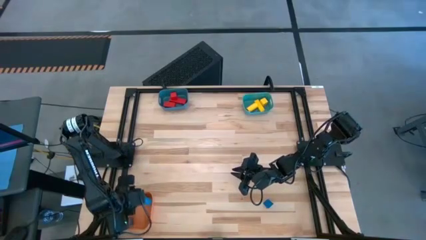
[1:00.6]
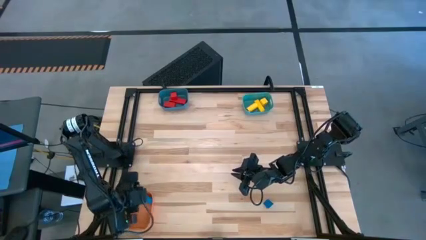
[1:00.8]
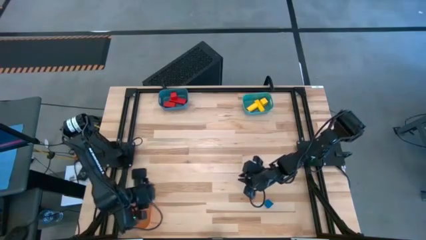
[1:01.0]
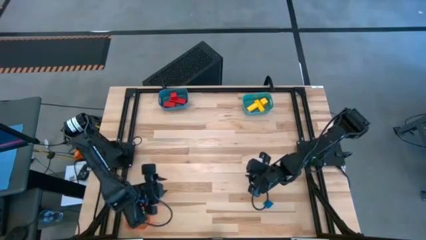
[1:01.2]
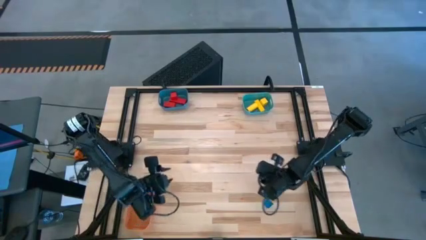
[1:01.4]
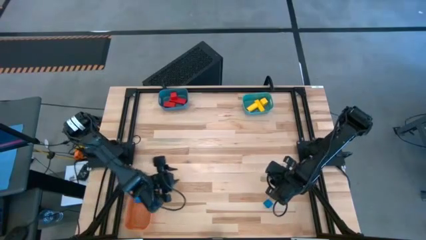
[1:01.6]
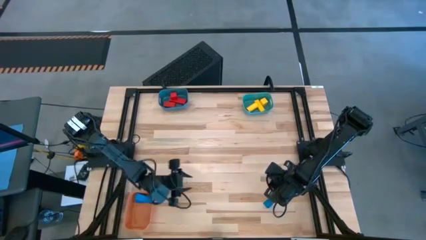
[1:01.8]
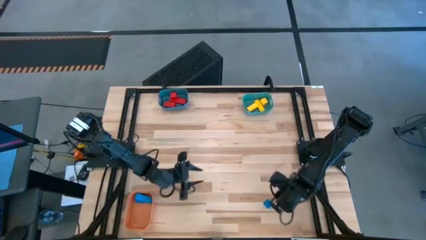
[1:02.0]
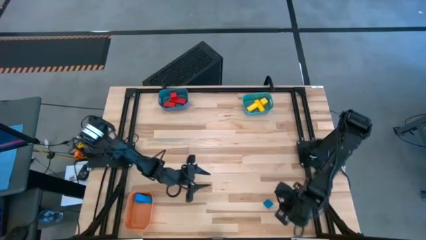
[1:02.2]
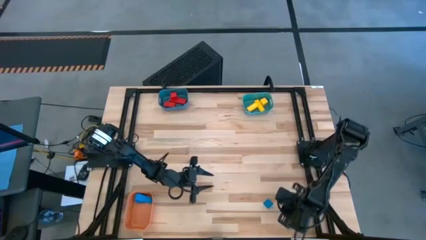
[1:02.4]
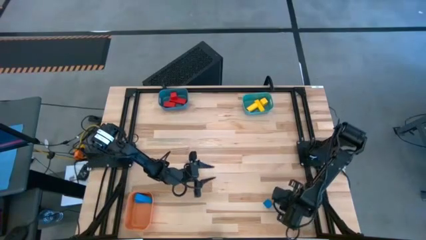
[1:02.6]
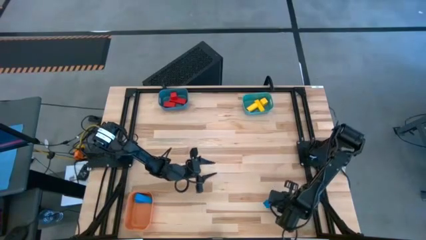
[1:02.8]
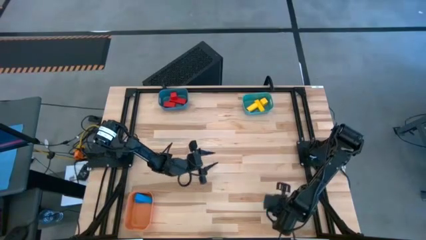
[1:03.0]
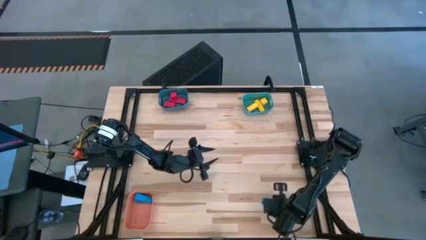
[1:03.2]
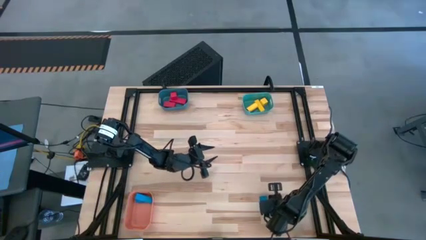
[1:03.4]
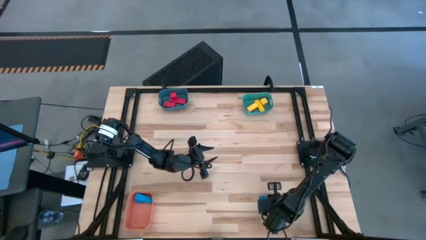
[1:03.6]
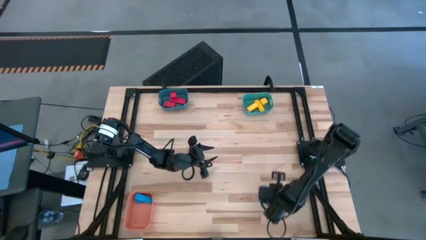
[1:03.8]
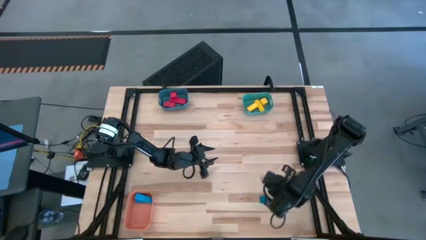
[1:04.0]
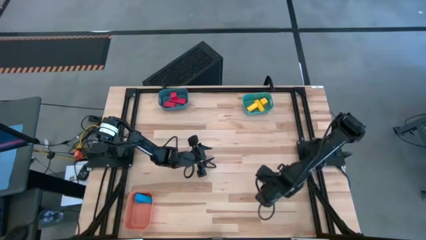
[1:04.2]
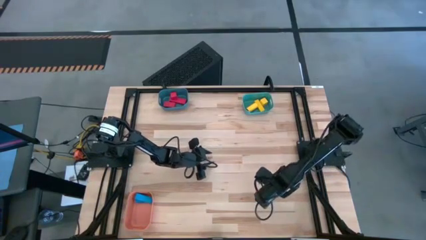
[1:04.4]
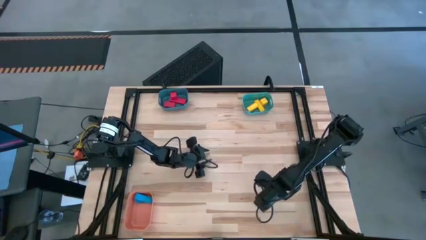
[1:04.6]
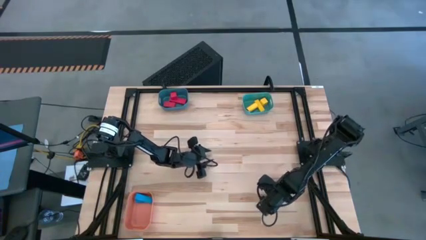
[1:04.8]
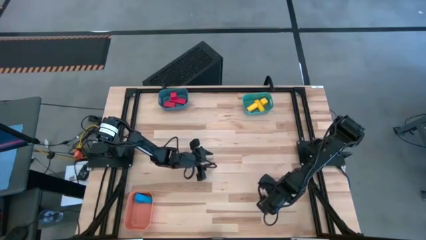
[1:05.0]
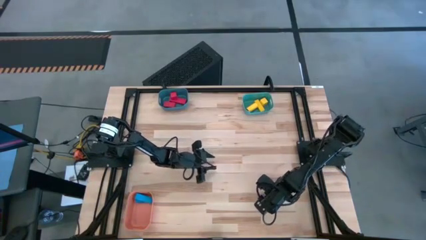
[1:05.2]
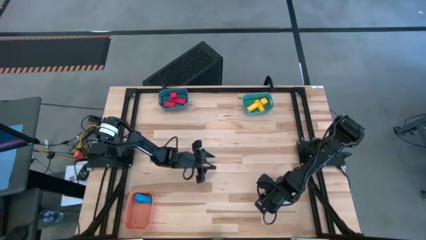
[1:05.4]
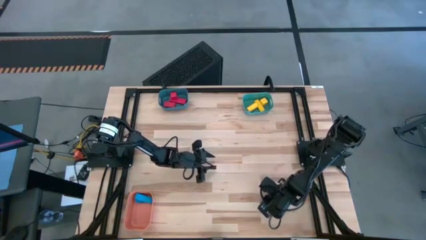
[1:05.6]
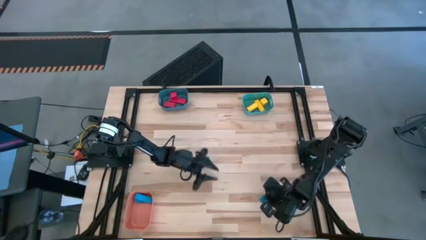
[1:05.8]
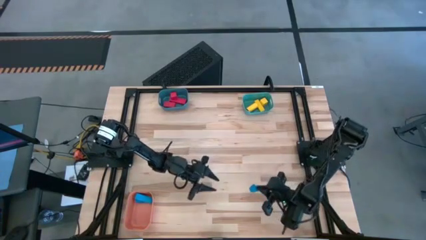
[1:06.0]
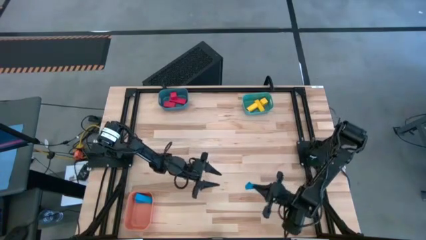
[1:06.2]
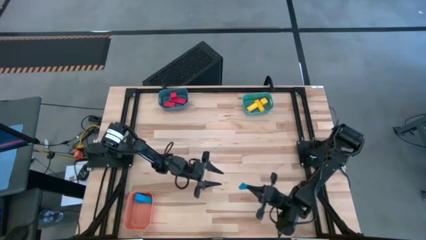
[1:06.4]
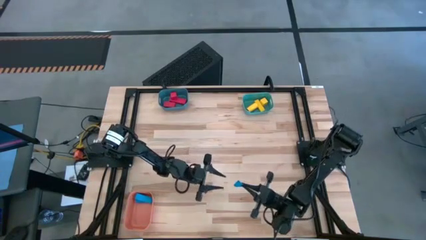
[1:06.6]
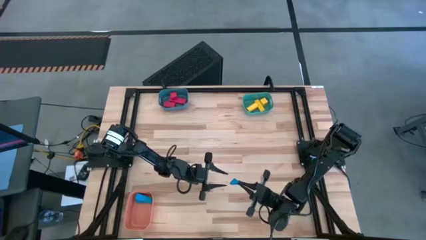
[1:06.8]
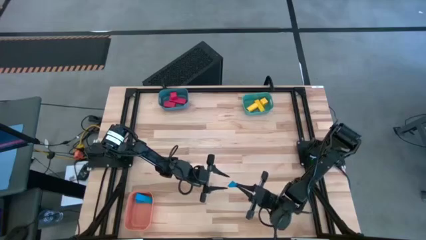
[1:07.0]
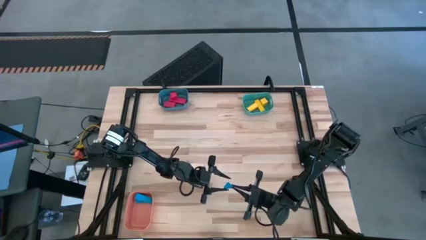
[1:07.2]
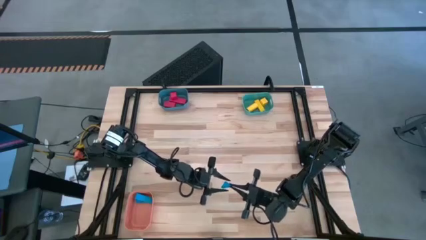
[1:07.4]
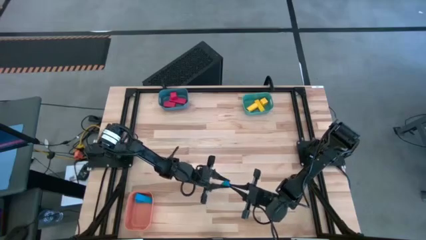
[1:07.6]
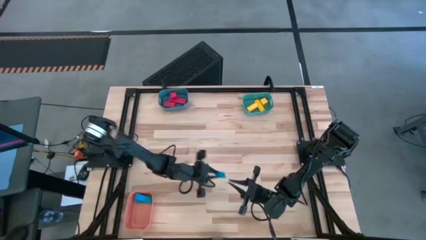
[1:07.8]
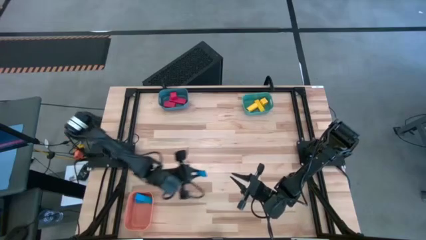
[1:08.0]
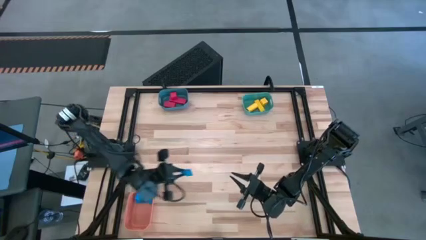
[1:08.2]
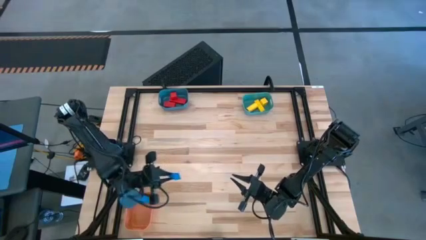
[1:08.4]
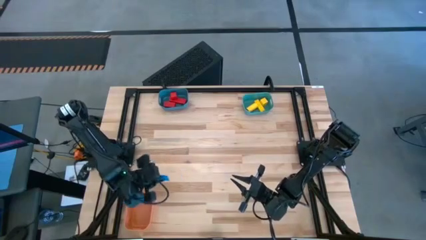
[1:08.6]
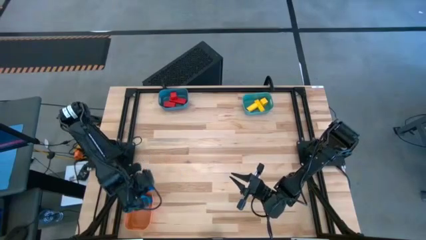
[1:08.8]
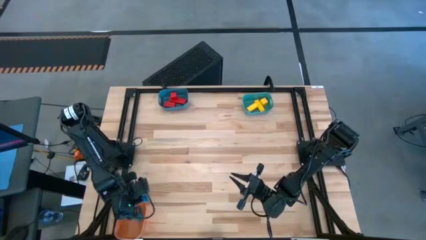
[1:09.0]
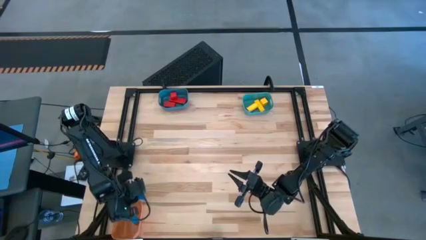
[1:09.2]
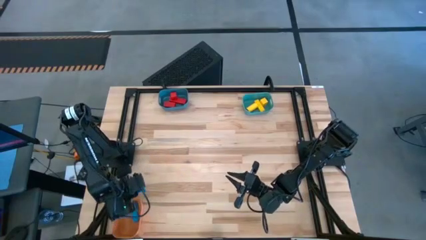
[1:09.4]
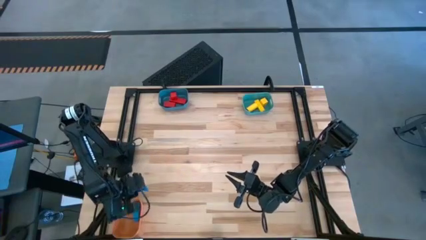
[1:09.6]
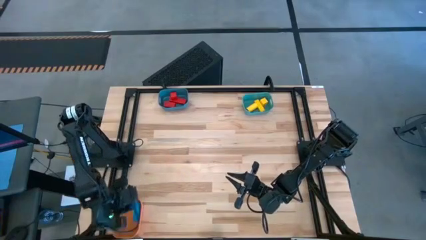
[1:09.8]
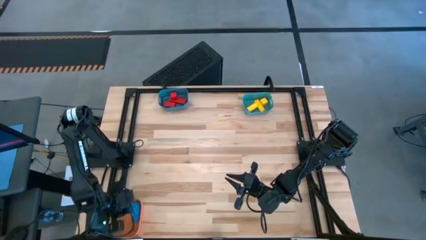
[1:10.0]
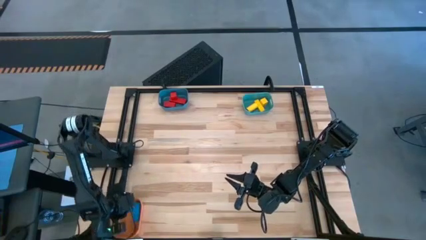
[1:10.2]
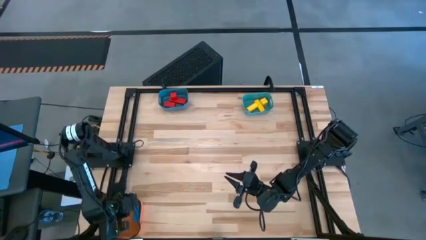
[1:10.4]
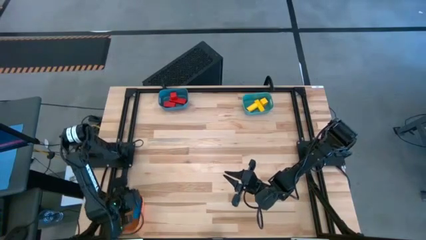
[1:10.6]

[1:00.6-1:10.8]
Task: Sort & place blocks by color
Put the blue block into the orange bin

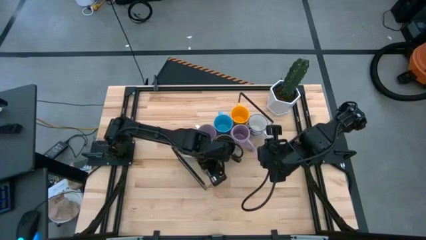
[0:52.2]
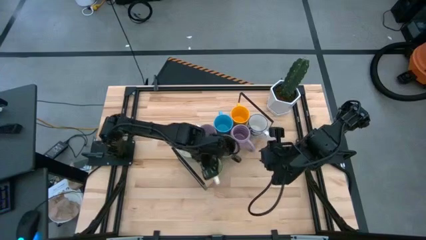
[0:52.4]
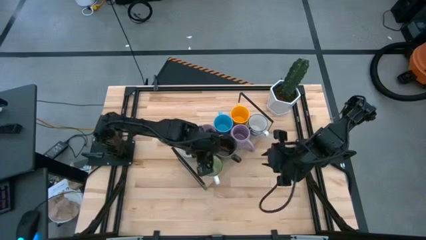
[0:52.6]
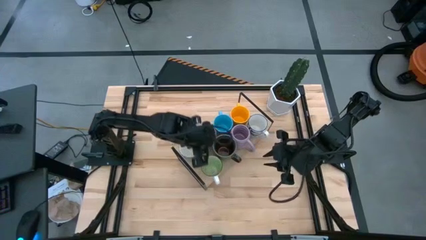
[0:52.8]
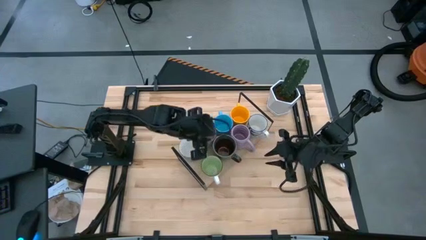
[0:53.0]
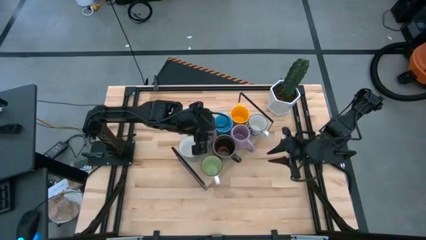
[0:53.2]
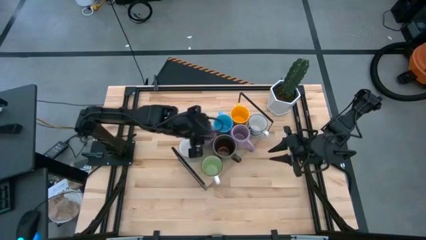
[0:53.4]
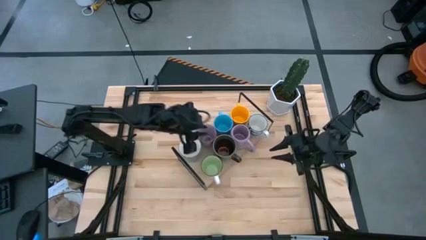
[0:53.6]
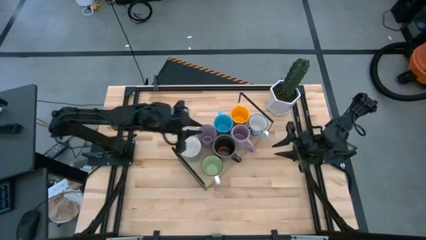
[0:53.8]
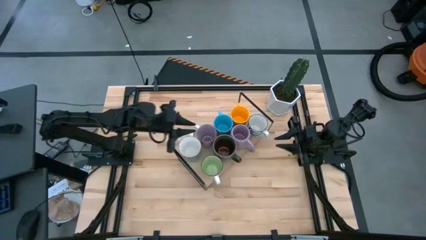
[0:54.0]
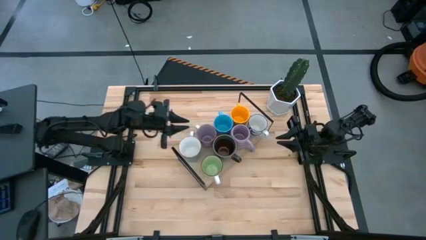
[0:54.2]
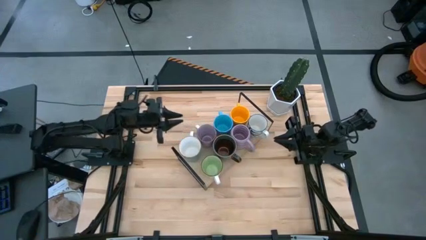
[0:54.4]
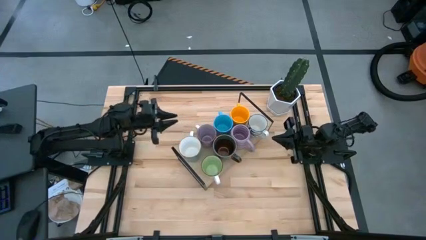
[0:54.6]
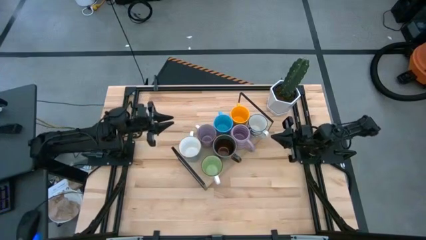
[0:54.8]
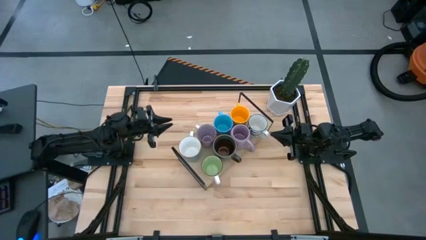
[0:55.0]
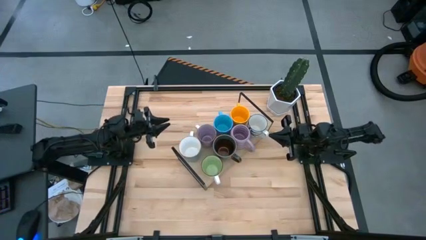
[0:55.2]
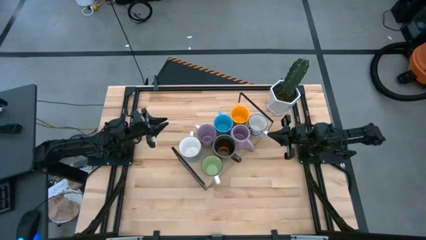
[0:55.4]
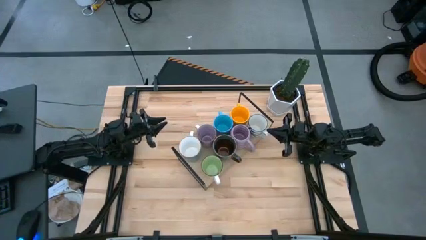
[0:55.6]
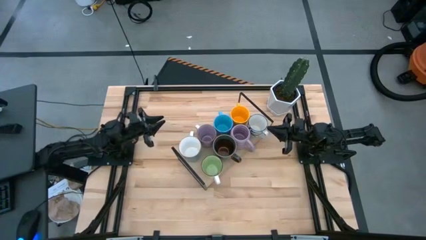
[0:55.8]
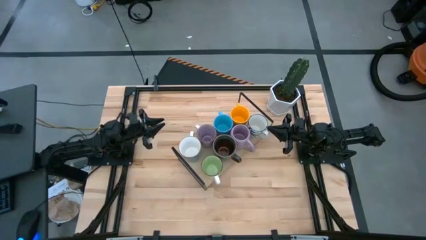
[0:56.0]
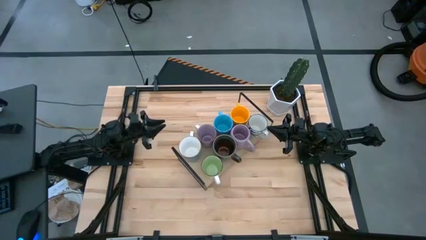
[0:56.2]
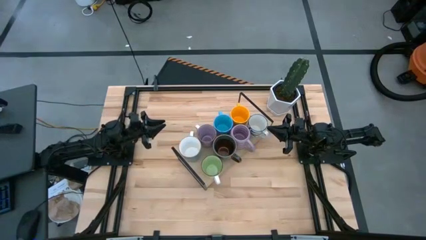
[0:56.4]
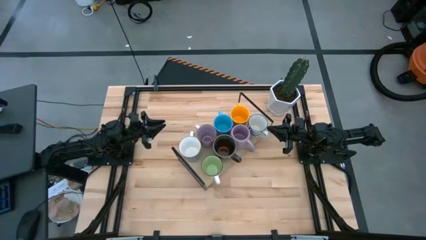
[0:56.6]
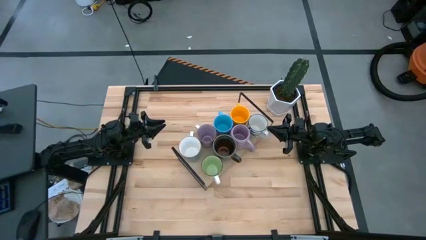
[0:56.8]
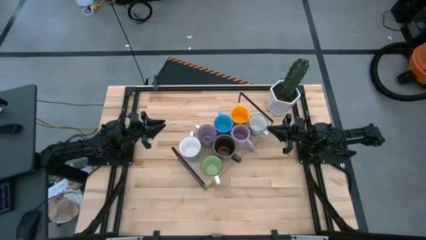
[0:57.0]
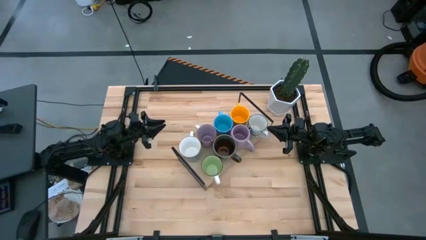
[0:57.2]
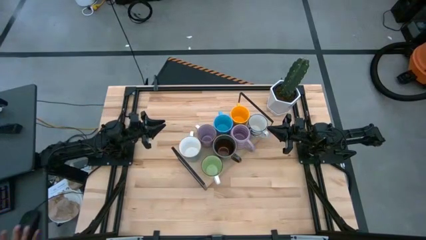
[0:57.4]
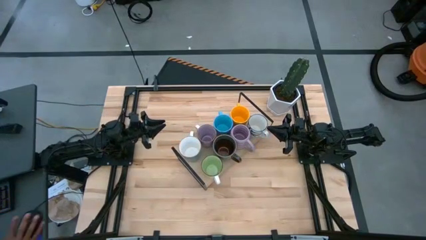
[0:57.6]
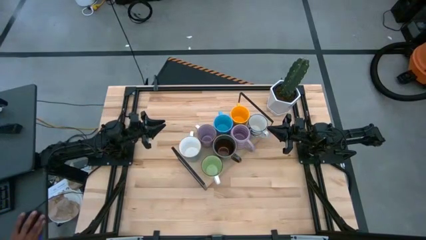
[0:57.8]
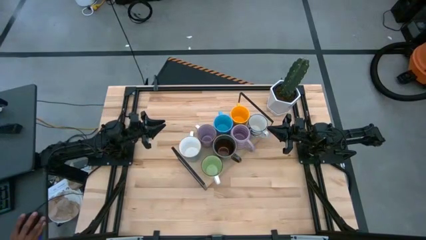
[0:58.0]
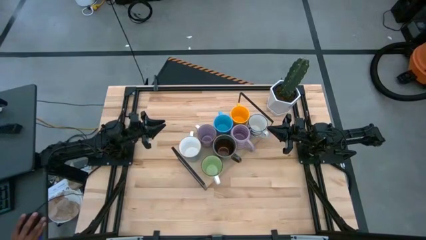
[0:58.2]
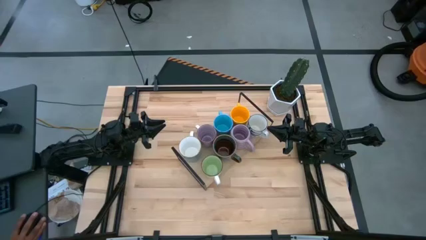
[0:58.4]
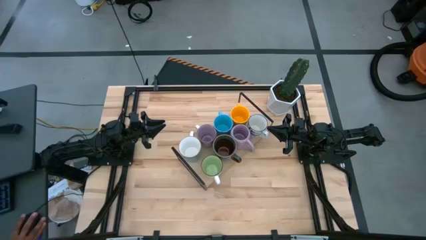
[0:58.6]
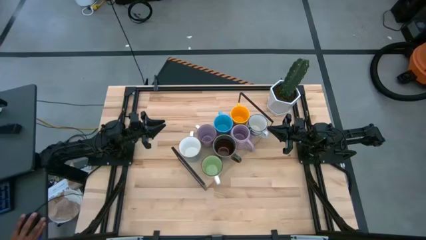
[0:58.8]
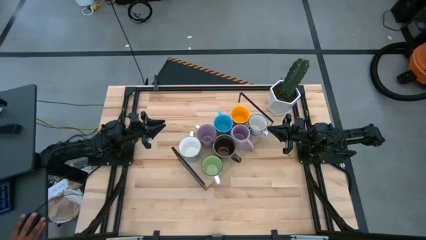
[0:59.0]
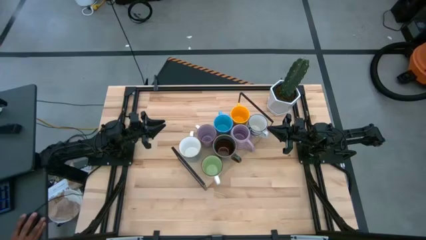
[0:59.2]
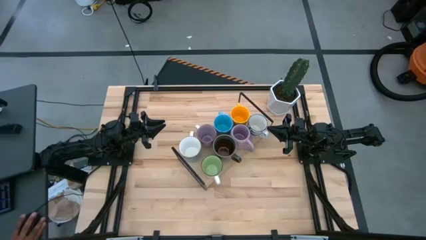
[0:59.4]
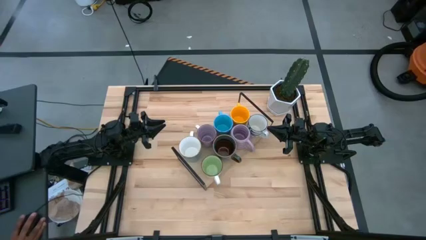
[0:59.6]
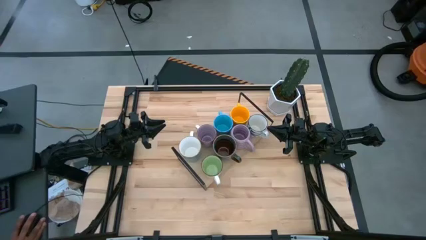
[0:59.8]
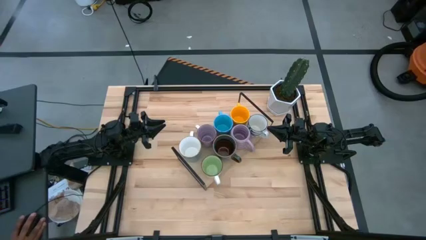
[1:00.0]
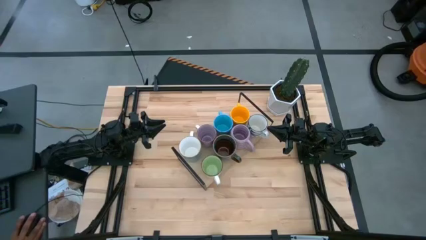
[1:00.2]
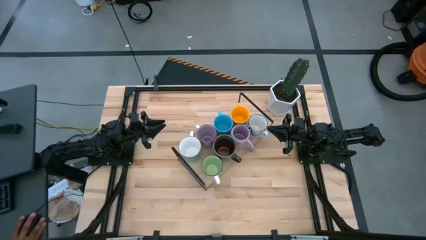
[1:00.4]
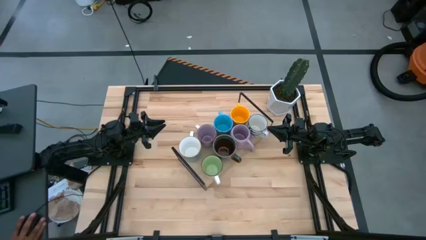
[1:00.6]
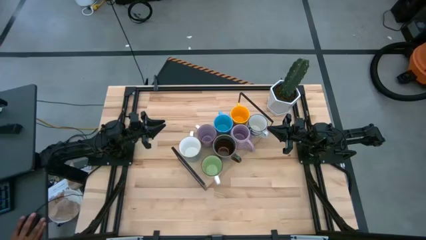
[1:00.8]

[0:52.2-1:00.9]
Task: Place coffee mugs
Return to Home Position
